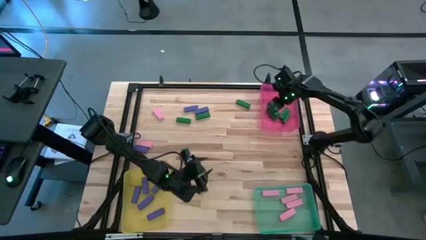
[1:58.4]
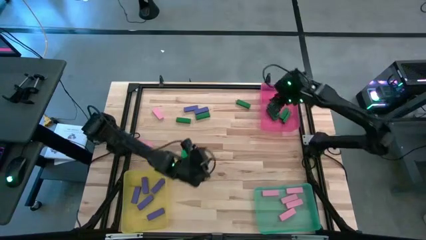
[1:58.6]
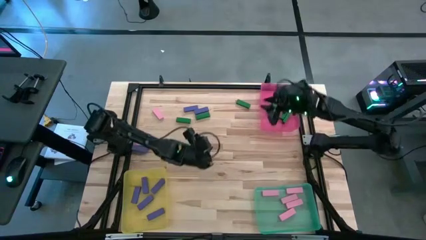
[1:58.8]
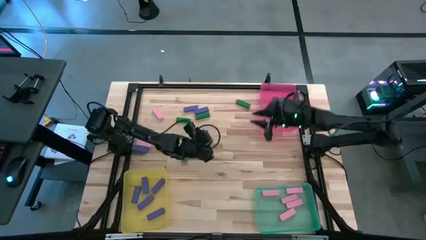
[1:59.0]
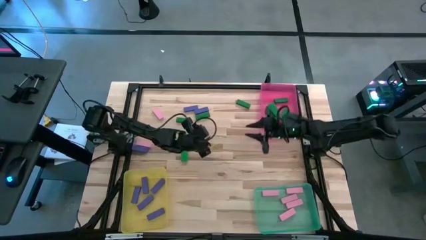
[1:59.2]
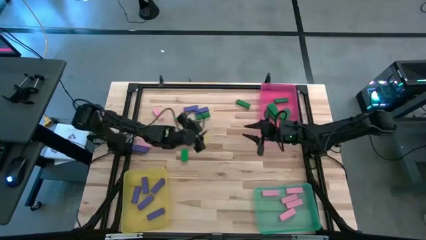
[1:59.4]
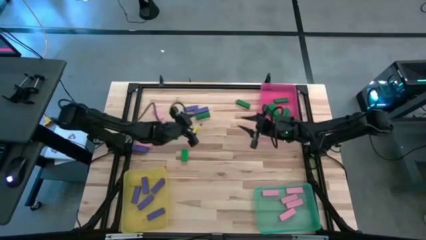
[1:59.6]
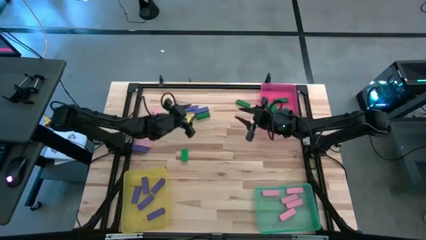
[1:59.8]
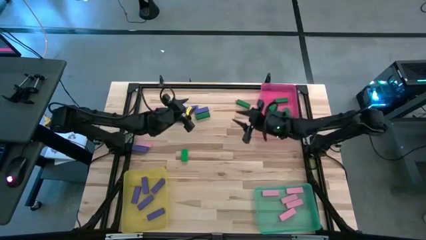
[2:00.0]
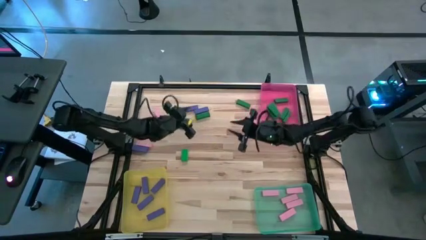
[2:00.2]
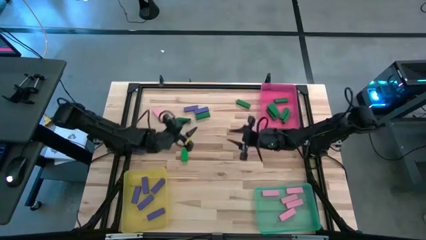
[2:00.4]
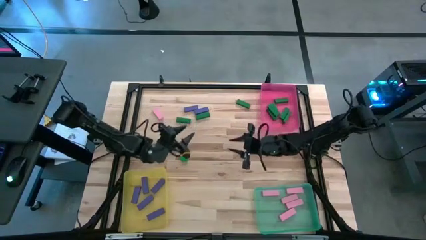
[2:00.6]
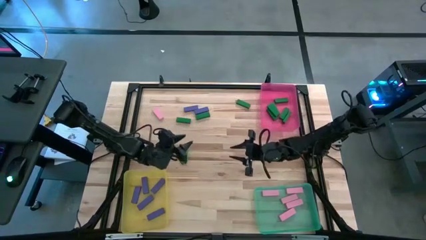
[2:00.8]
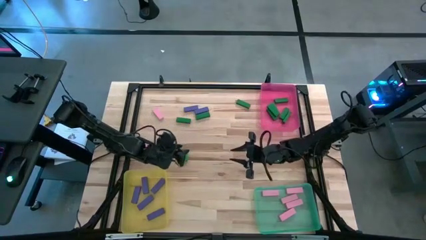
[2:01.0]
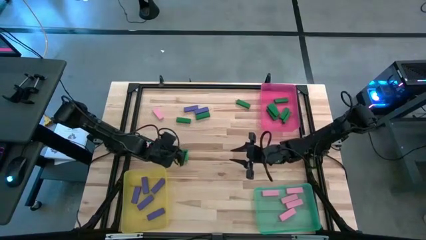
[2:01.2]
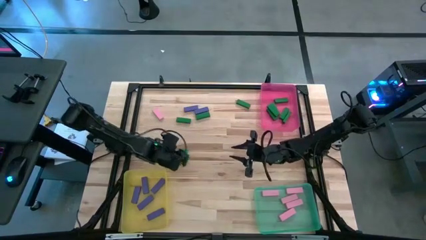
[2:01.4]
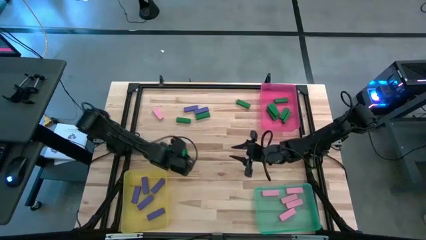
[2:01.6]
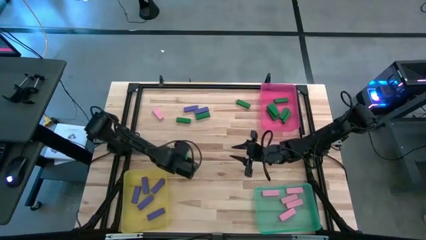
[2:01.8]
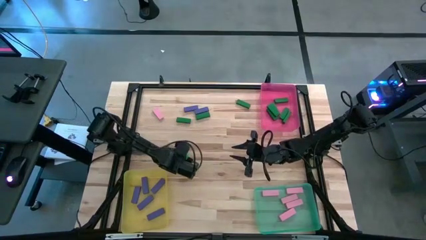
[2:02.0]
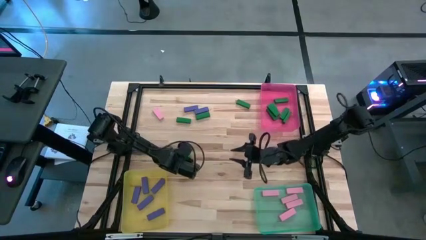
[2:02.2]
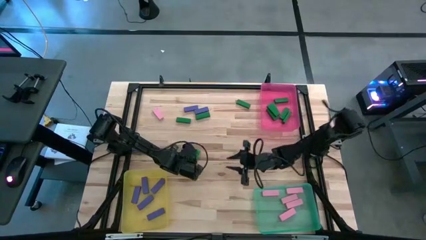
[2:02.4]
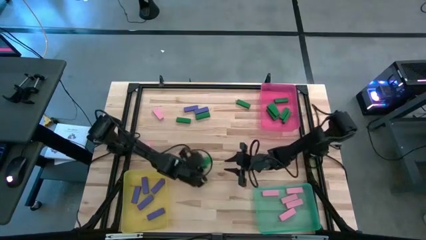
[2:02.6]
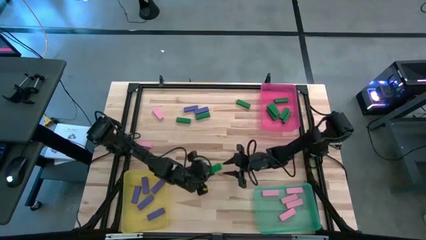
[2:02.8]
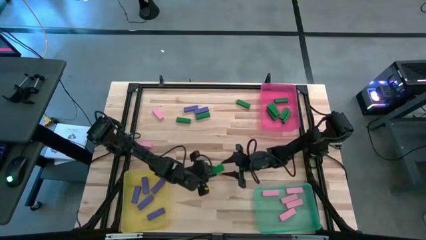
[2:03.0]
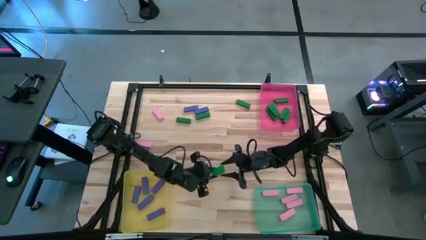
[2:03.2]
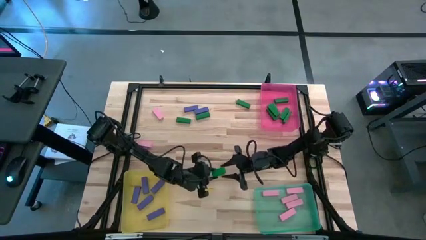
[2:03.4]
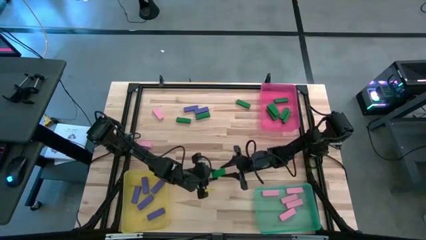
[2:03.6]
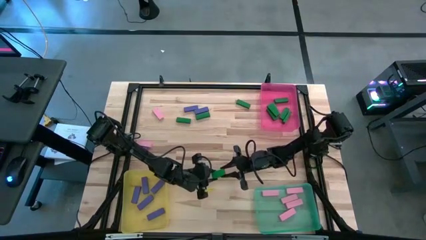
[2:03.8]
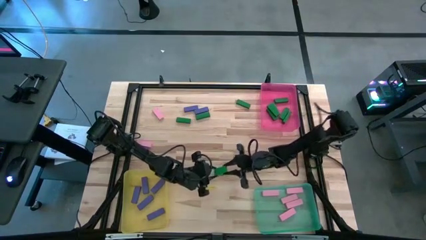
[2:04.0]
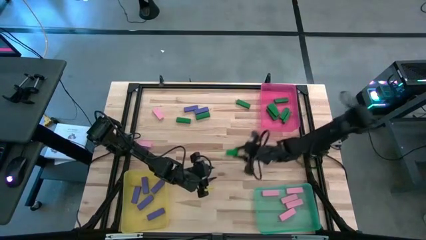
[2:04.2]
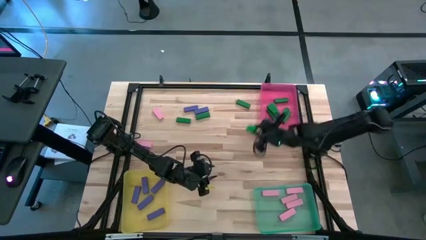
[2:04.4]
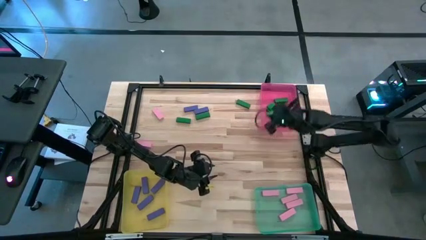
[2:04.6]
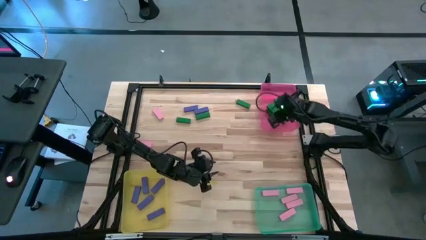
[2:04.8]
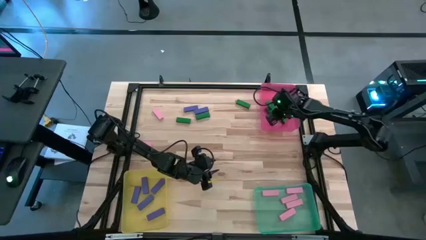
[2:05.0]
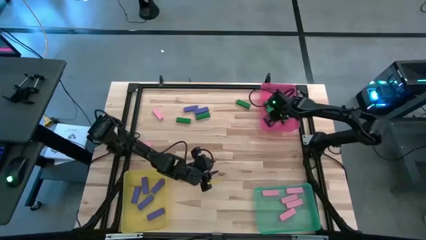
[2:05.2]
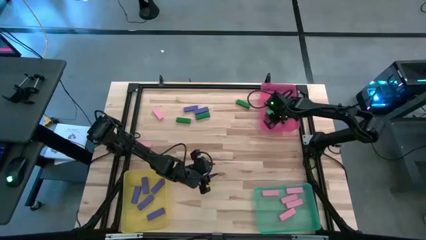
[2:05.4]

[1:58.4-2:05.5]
Task: Sort blocks
Put the green block into the pink bin

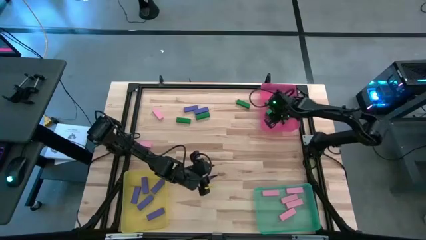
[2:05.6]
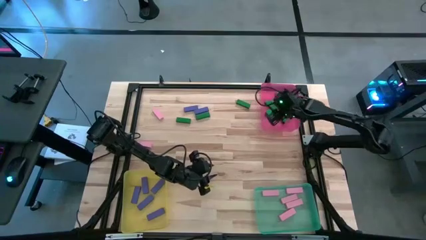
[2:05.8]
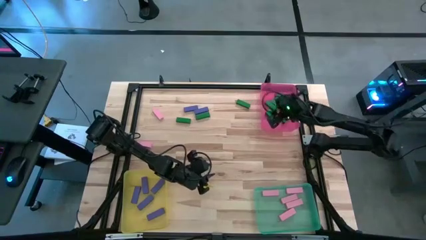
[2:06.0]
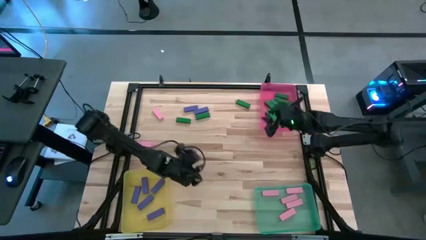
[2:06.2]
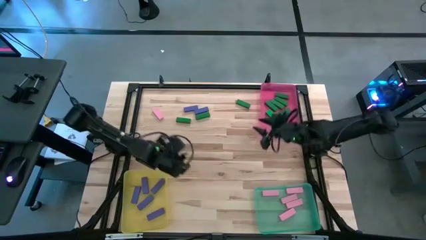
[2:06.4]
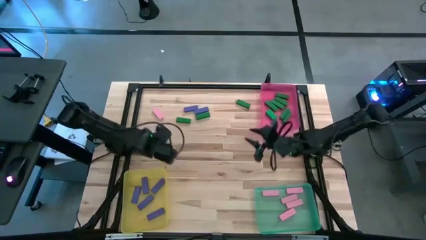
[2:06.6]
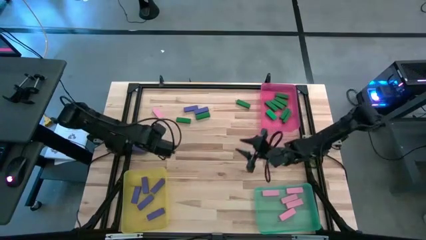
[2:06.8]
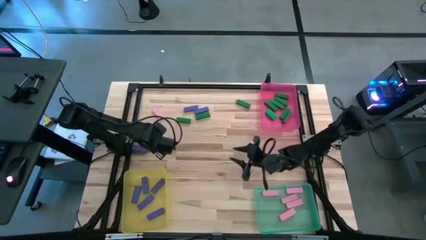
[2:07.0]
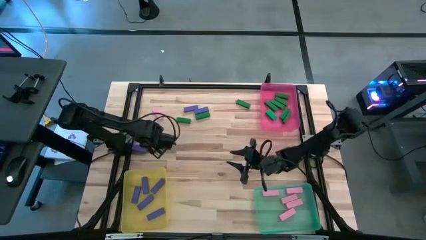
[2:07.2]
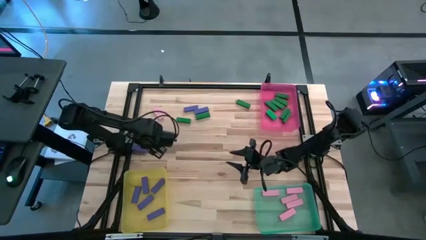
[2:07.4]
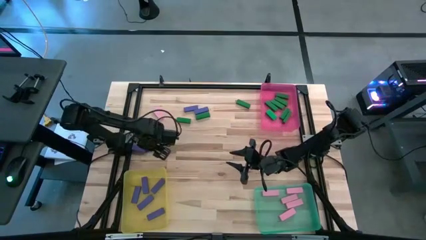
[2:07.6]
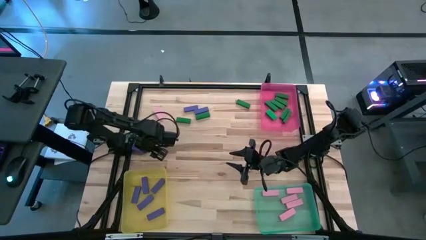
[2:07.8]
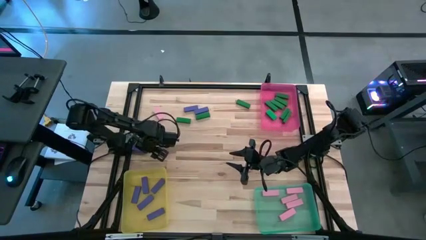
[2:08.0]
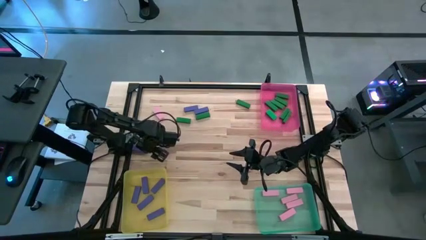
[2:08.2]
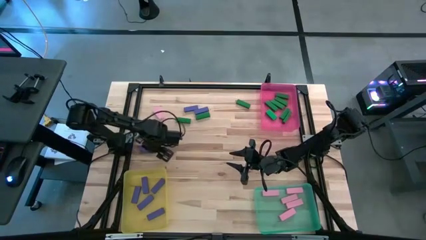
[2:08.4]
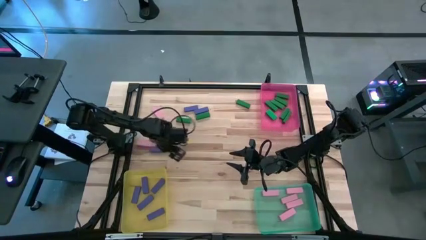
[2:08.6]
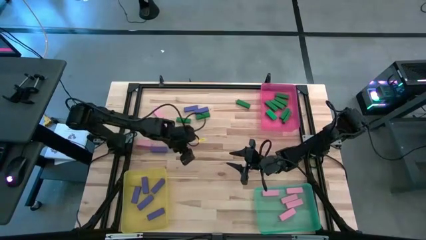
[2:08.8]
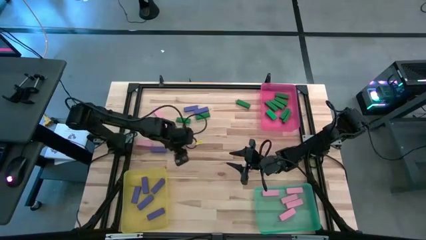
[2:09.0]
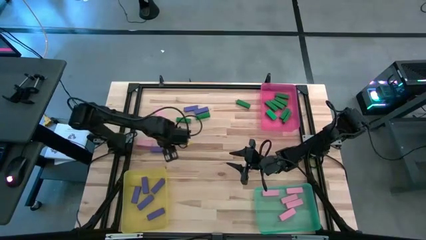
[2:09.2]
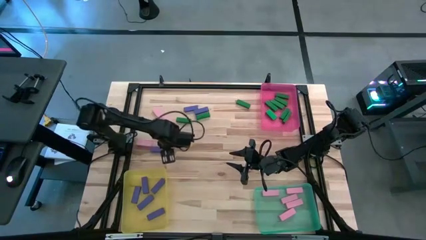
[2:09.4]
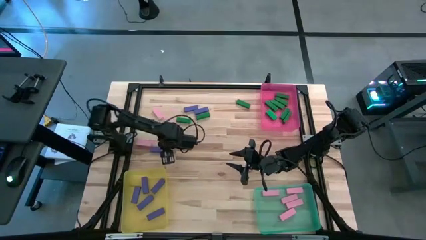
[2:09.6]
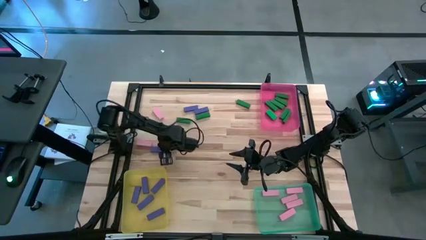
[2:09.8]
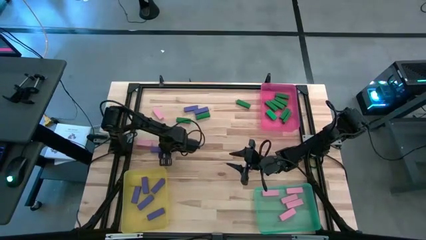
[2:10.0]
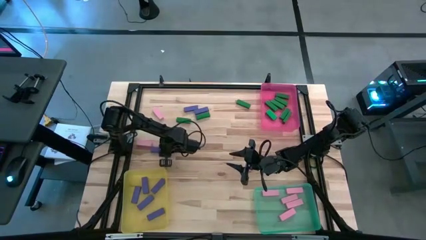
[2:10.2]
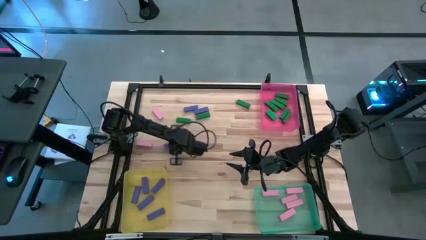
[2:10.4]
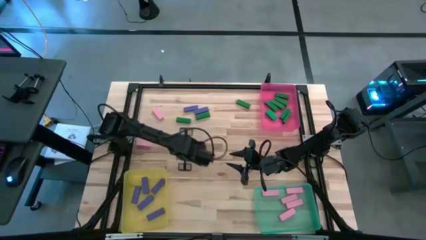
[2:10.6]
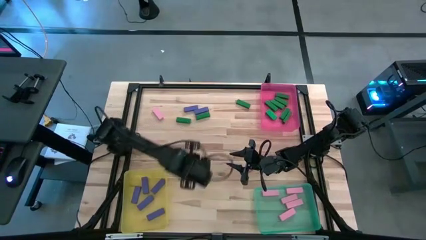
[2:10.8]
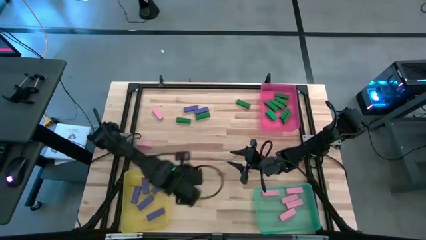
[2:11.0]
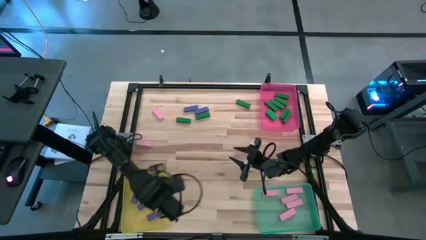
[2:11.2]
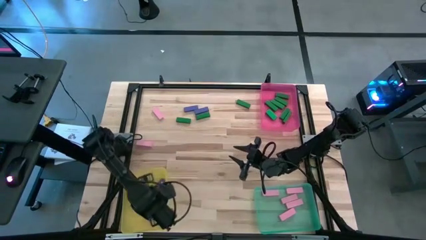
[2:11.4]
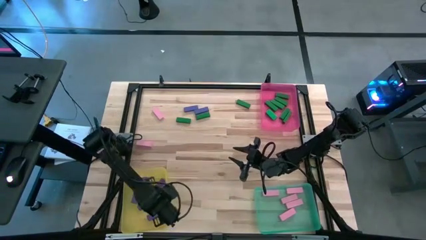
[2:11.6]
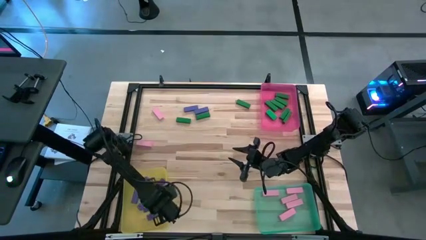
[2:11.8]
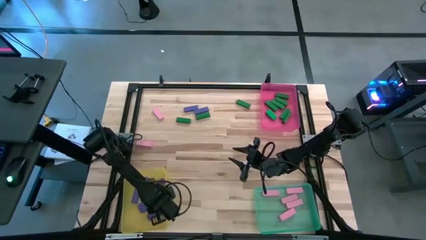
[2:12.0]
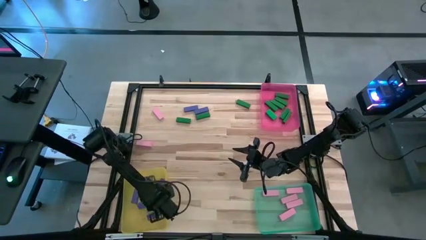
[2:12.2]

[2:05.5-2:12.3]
Put the blue block into the yellow bin

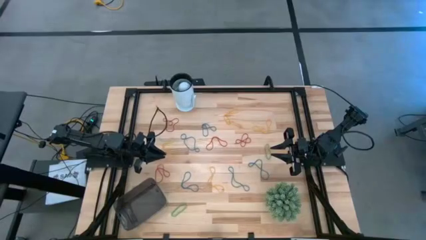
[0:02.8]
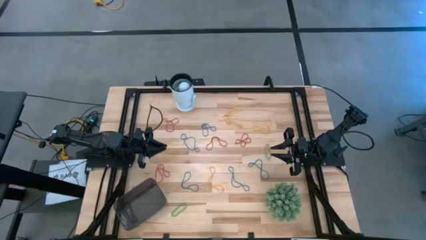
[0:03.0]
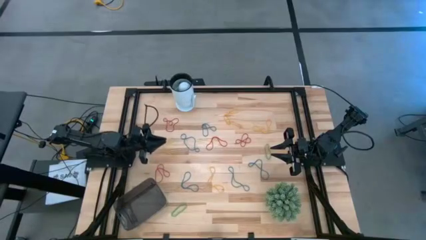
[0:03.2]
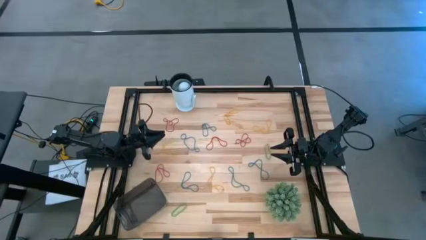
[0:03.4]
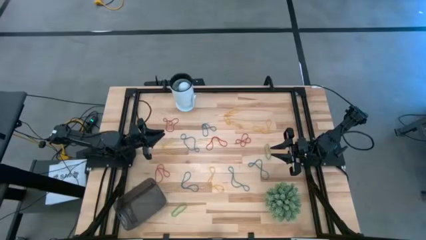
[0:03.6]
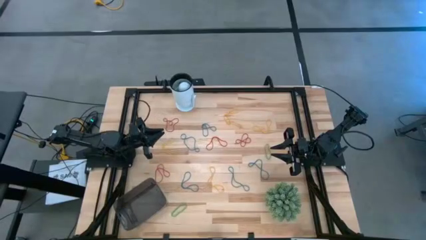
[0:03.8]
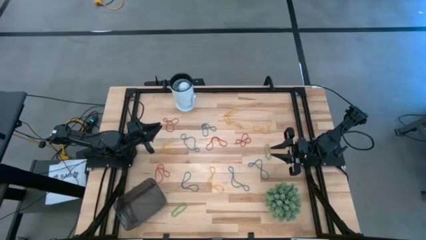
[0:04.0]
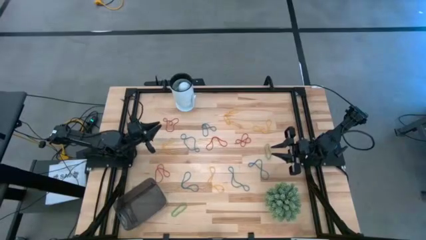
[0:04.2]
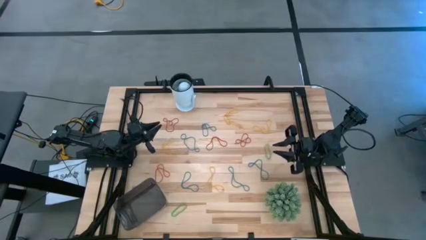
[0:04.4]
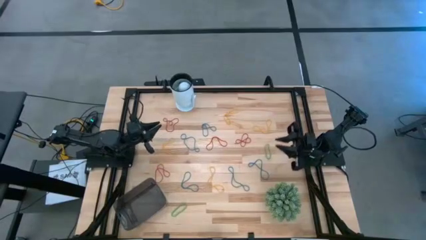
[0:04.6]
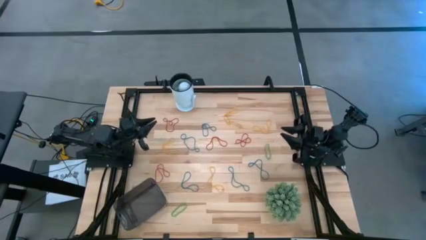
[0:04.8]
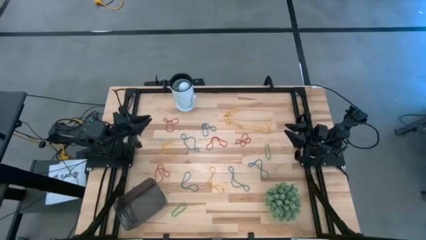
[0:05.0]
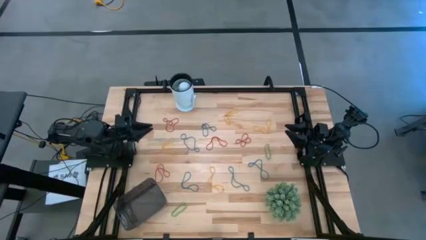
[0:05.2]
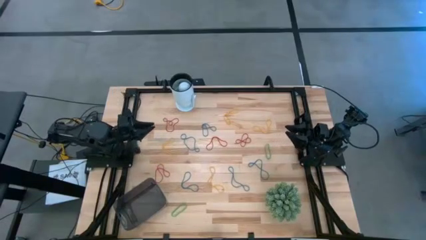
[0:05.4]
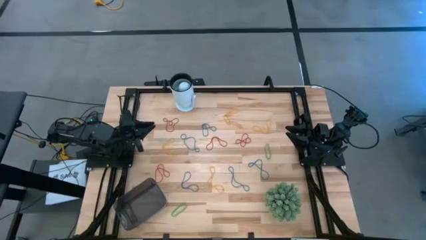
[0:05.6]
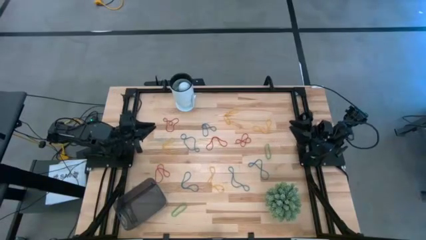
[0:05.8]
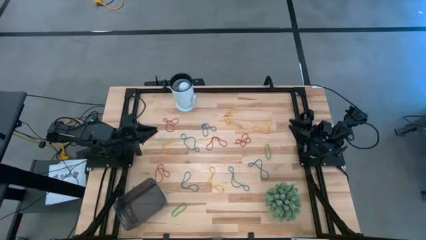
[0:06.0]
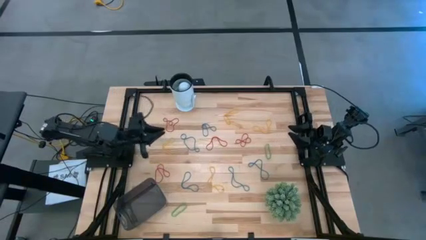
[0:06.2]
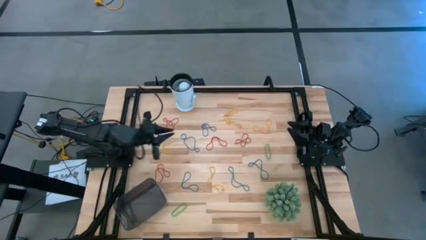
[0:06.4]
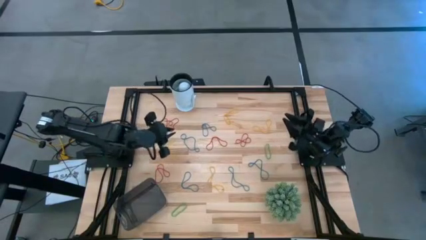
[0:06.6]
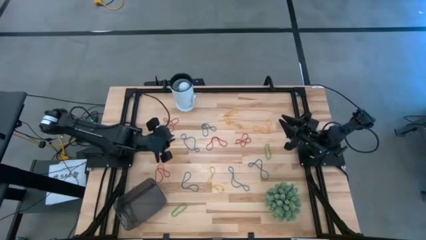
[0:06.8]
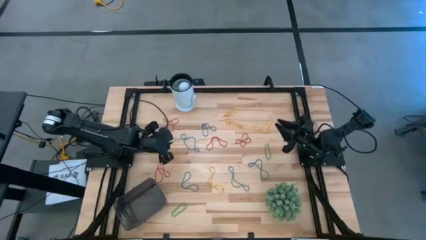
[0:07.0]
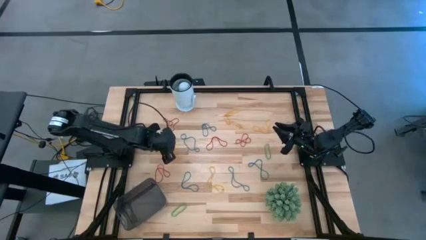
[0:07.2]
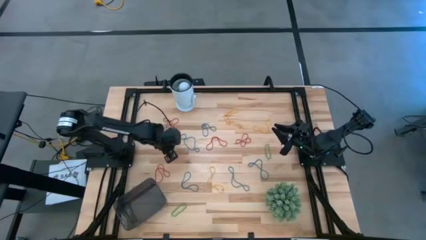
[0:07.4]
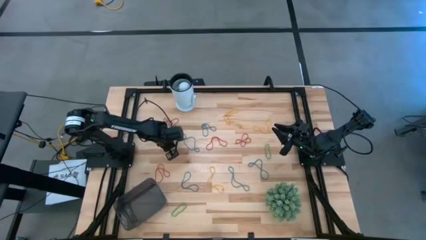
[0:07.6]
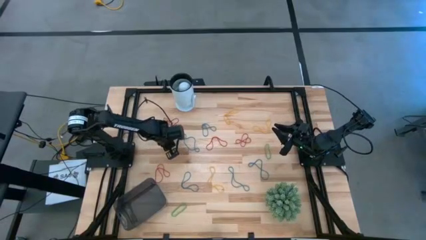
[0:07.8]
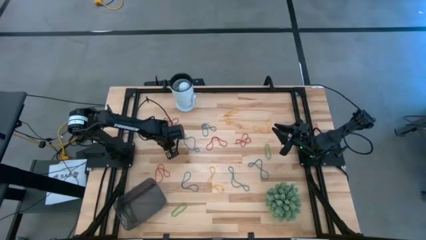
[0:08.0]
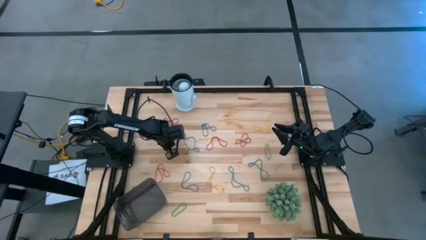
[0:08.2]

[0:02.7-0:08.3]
Task: Pick and place items into bin
Put the yellow rubber band into the black bin
